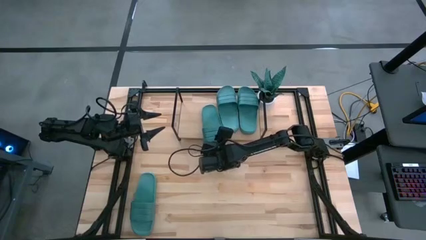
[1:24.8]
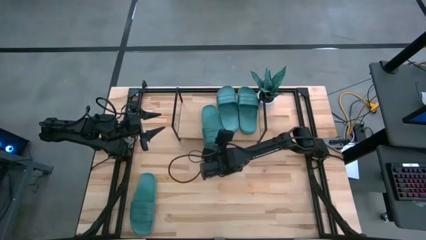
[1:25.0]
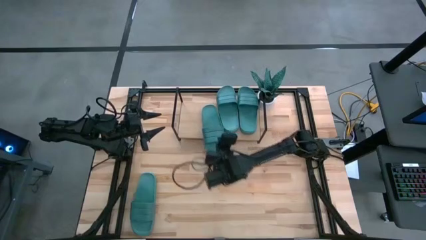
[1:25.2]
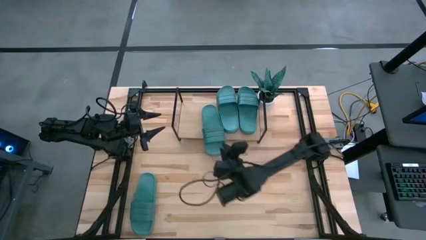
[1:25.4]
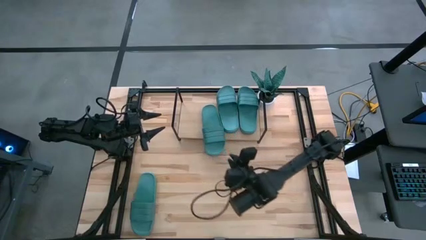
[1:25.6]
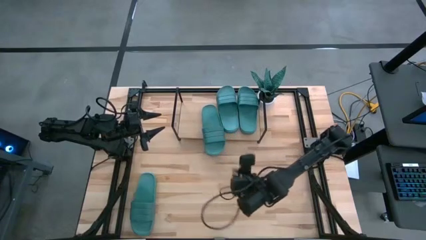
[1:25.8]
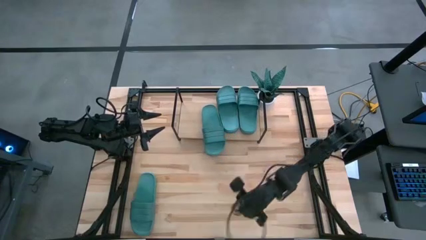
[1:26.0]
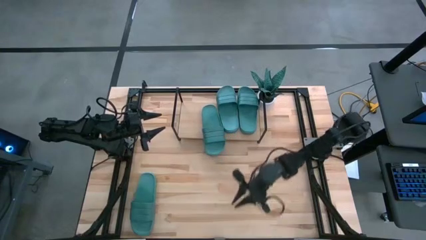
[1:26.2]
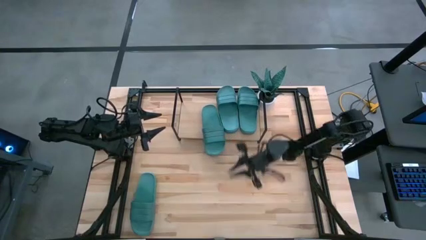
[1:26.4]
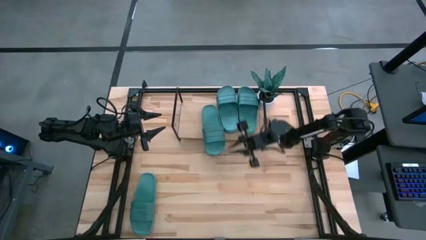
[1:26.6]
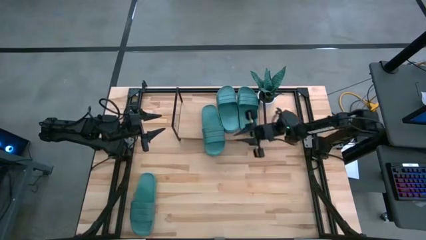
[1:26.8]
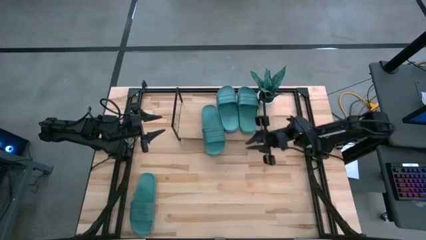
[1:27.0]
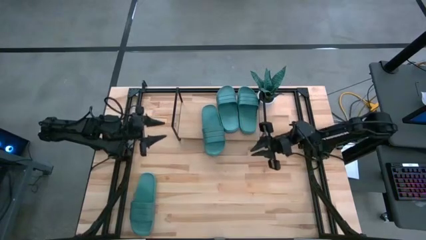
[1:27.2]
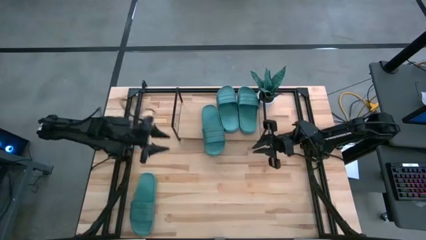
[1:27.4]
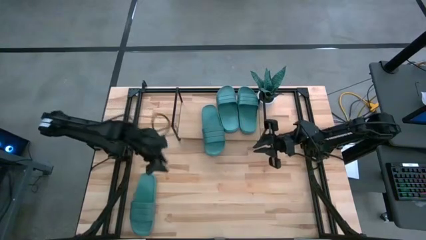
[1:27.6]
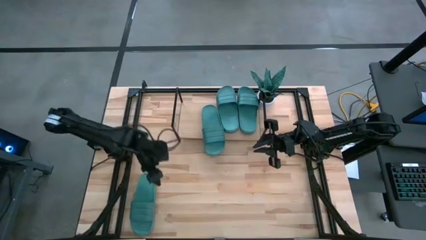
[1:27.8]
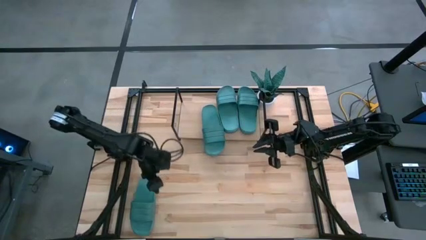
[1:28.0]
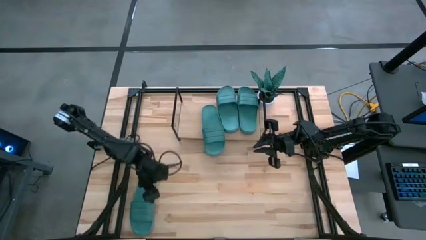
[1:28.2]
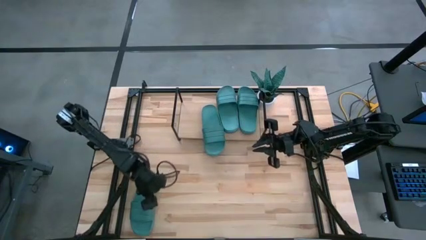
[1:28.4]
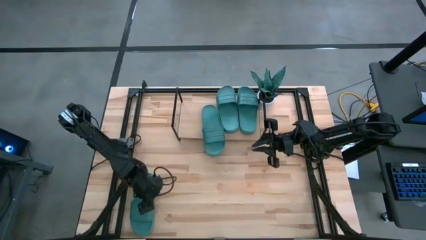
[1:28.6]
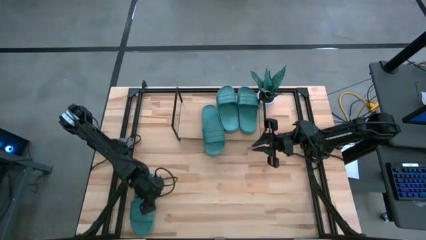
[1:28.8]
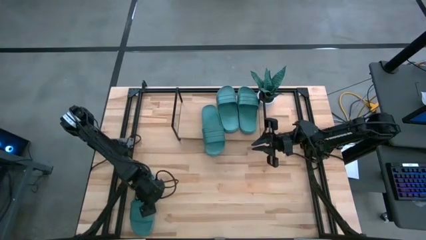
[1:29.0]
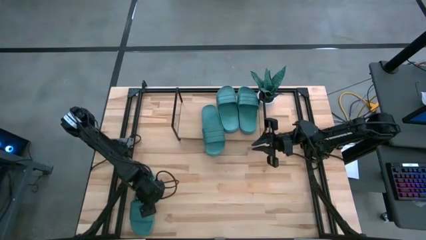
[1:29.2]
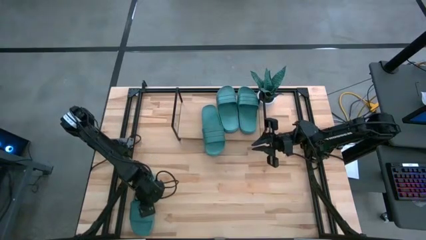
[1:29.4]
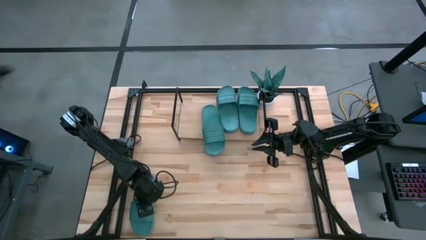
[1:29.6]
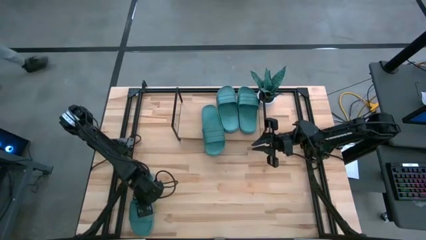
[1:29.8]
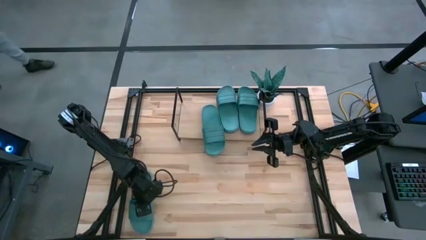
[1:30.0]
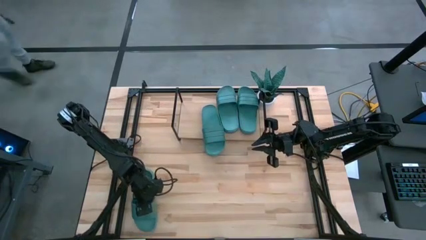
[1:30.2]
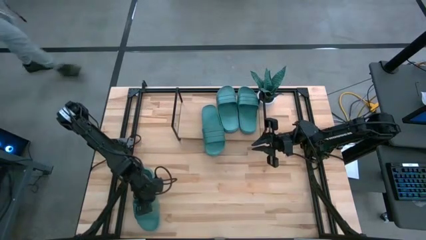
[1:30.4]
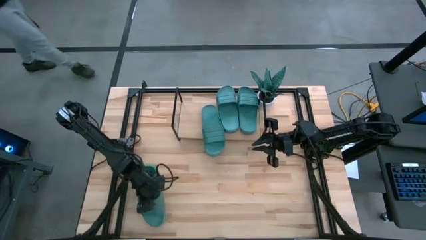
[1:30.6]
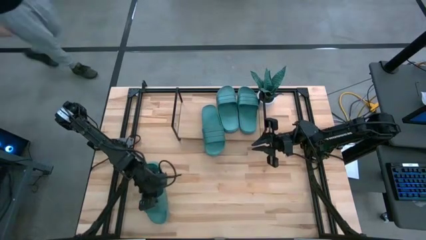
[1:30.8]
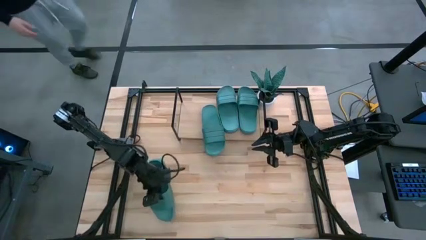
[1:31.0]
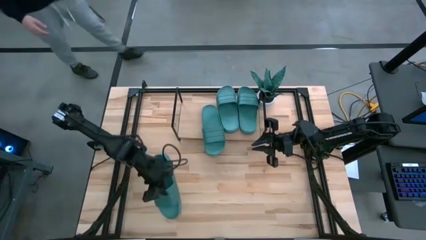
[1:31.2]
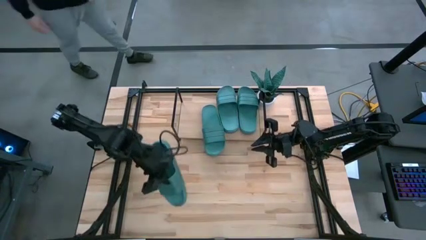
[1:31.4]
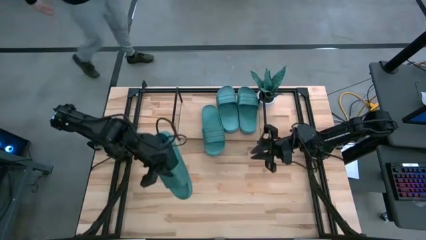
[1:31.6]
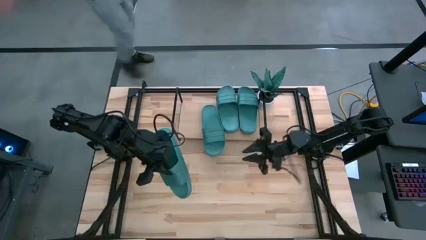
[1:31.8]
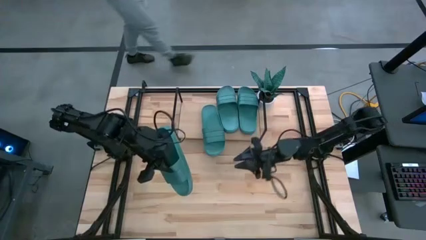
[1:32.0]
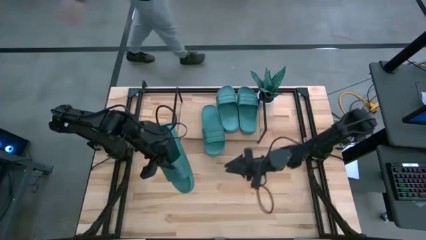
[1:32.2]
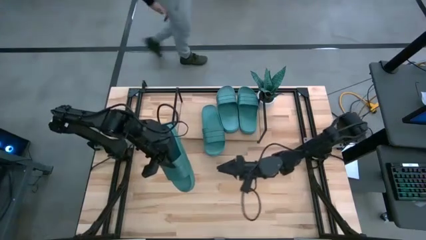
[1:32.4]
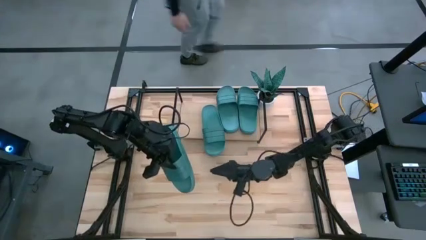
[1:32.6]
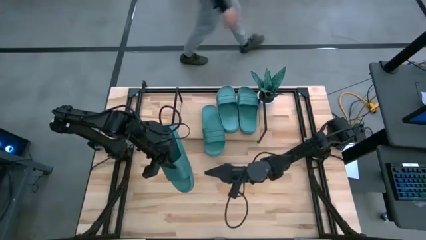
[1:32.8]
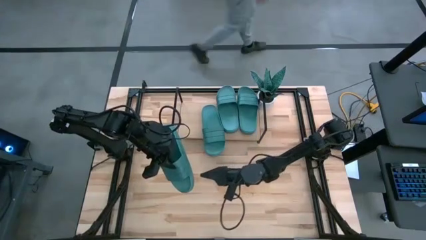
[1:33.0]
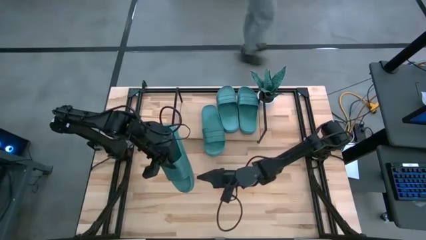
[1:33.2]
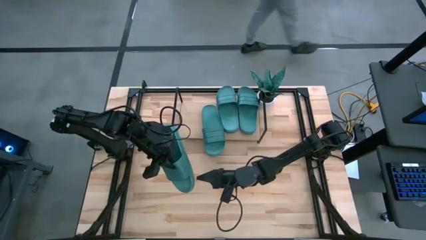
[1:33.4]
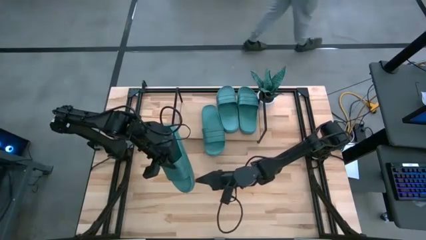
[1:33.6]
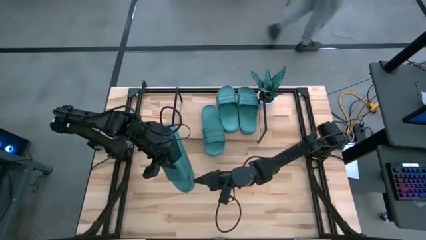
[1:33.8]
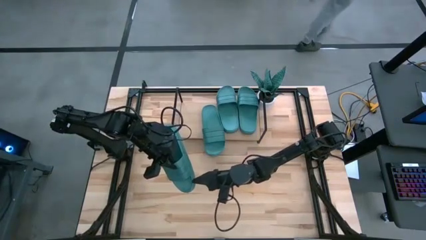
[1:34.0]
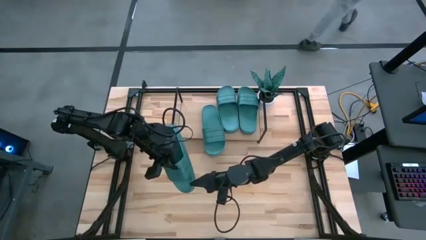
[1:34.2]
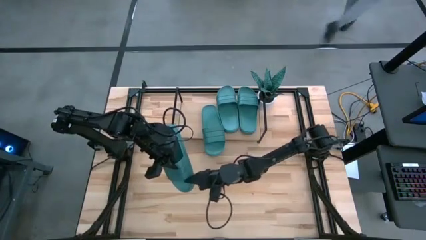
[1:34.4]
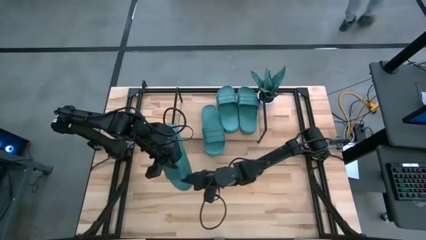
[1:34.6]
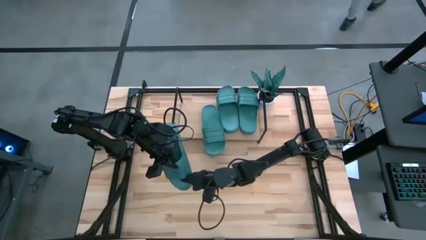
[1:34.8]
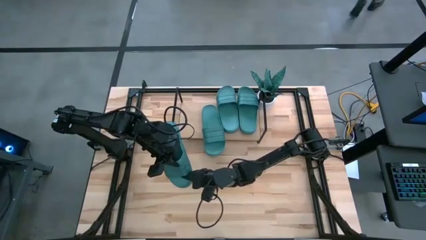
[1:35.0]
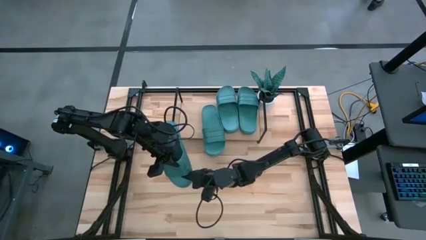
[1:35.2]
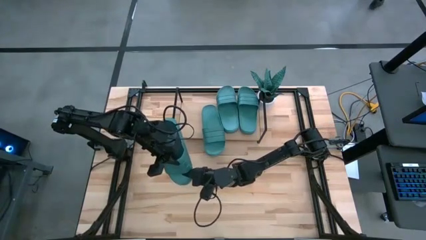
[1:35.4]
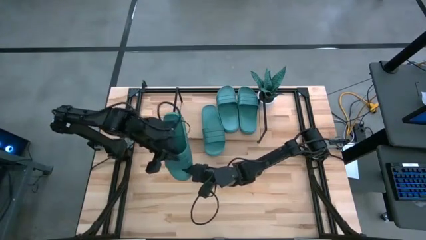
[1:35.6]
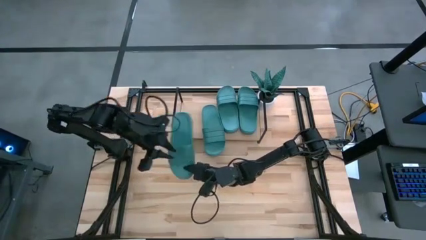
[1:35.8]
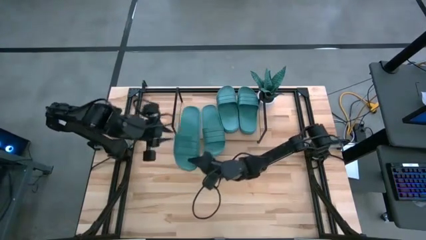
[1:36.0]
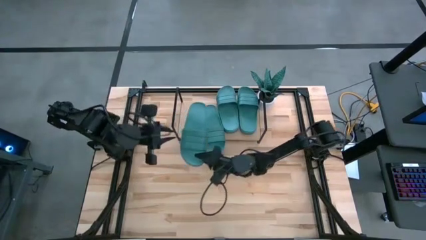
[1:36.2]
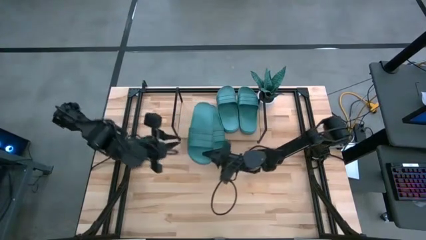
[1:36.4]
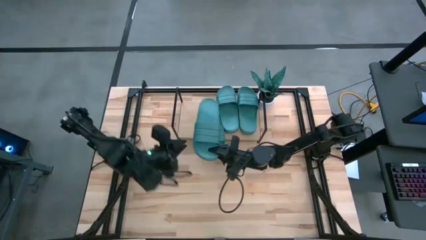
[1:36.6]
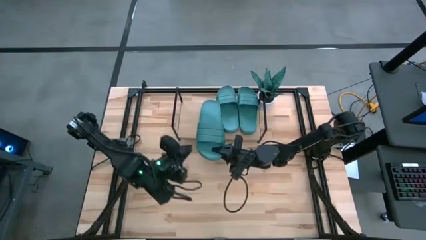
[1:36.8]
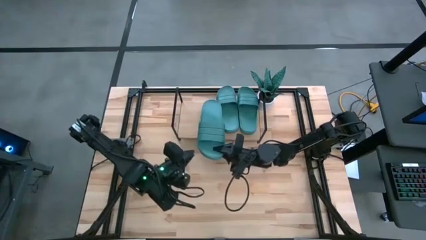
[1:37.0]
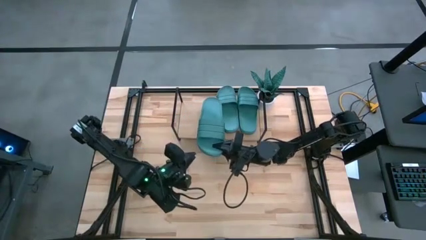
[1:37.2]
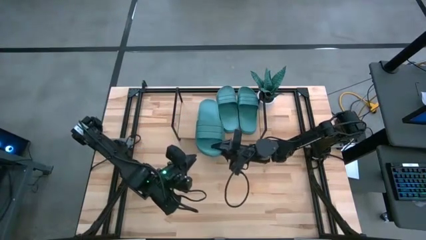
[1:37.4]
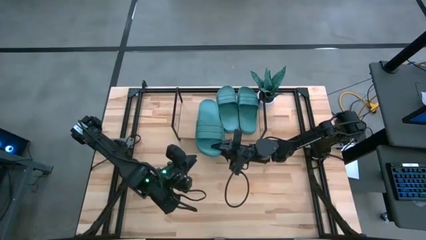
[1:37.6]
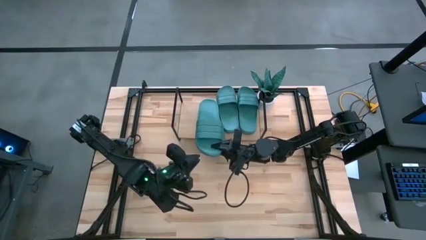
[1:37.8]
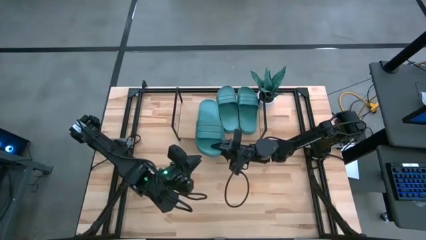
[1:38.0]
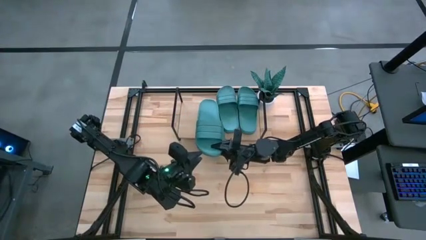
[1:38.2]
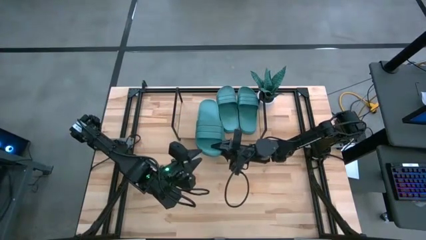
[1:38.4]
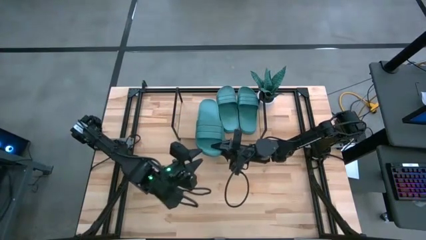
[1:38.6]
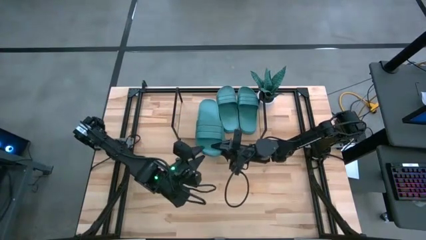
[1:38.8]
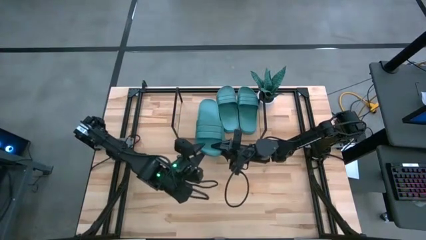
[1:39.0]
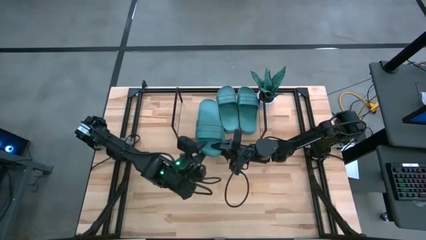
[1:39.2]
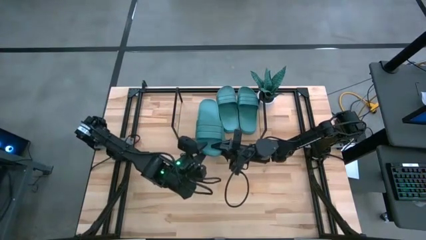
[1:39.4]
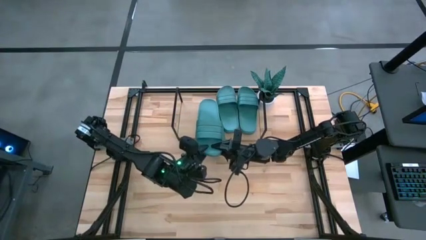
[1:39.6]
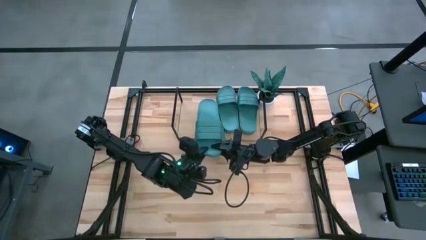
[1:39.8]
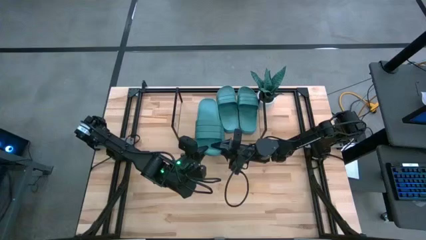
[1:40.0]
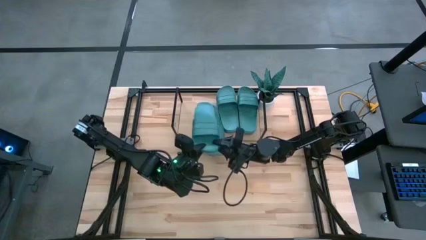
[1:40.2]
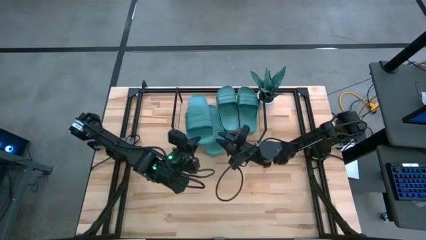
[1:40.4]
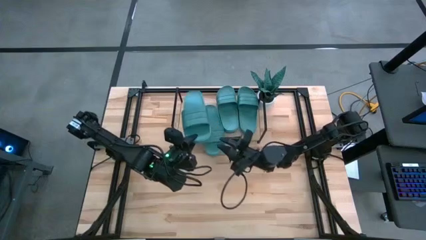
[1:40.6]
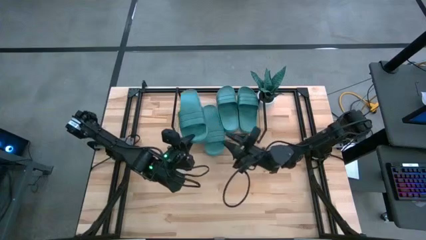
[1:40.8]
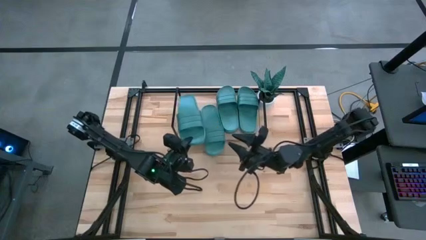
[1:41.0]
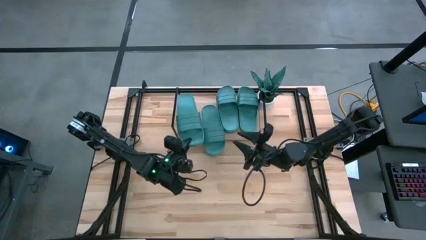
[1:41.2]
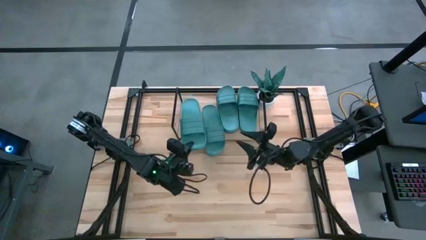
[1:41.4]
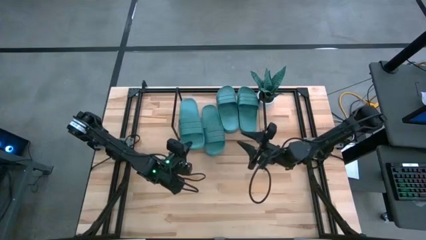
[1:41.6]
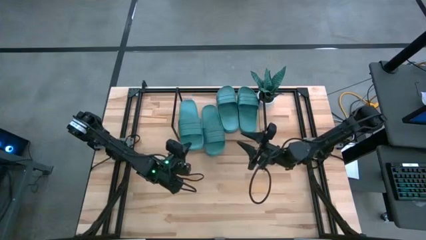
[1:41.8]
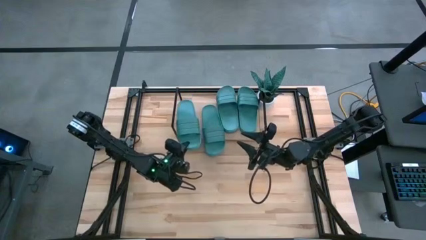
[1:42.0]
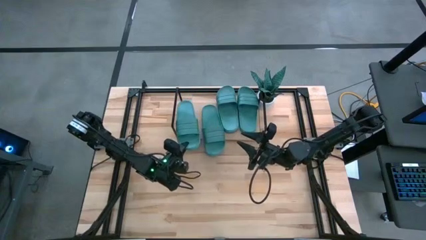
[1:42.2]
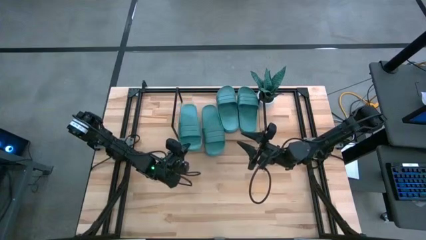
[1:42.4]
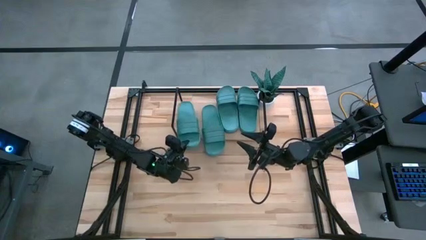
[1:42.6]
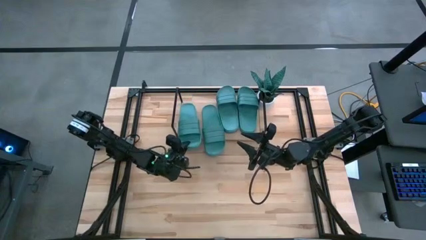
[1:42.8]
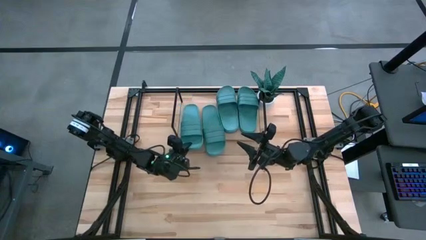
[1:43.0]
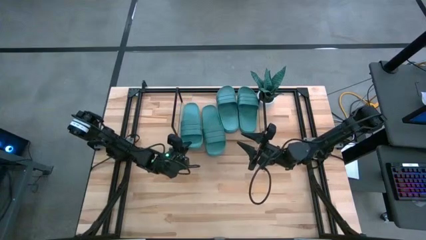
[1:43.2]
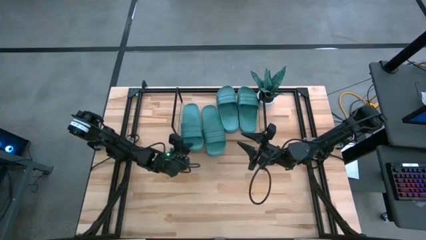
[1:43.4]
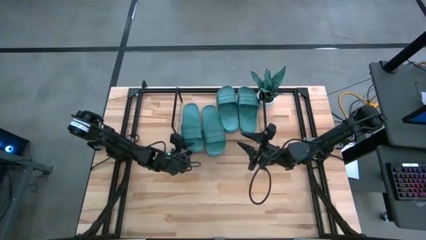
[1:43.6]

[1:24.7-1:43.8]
Task: Pick and place slides into the shelf
Put the green slipper on the shelf
